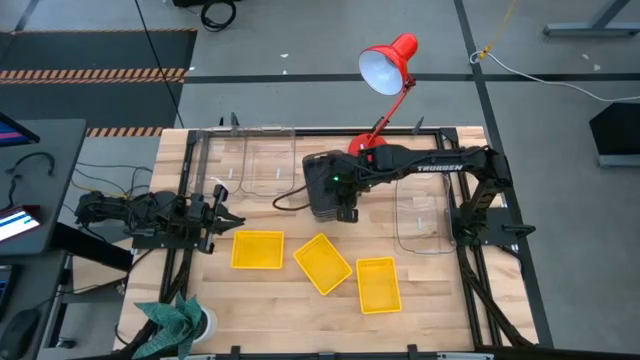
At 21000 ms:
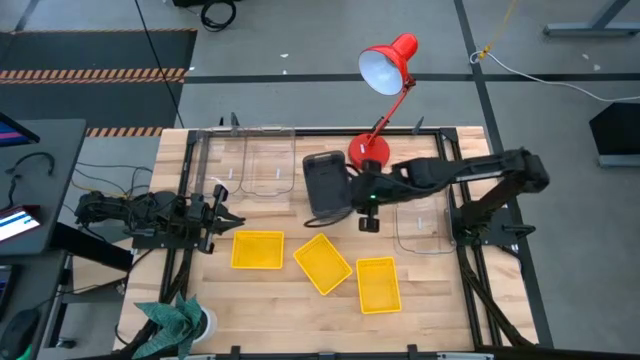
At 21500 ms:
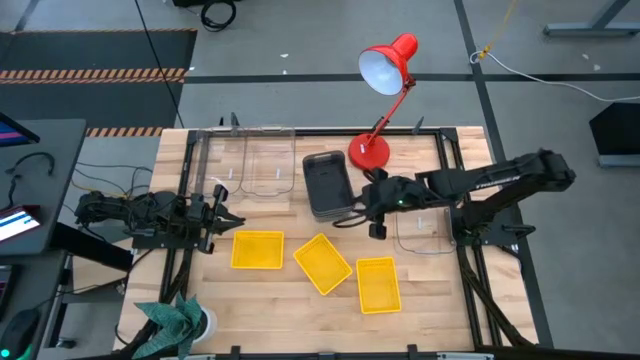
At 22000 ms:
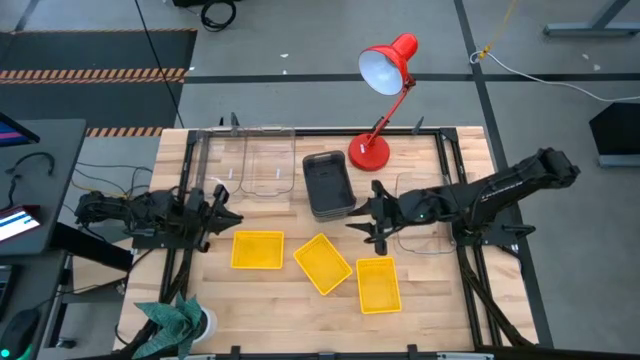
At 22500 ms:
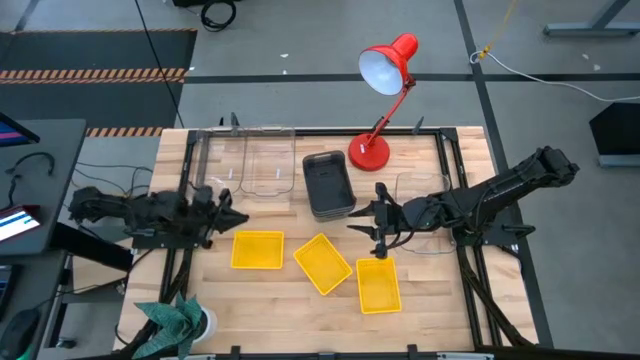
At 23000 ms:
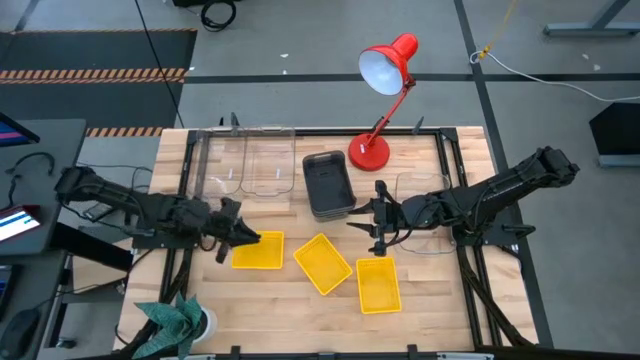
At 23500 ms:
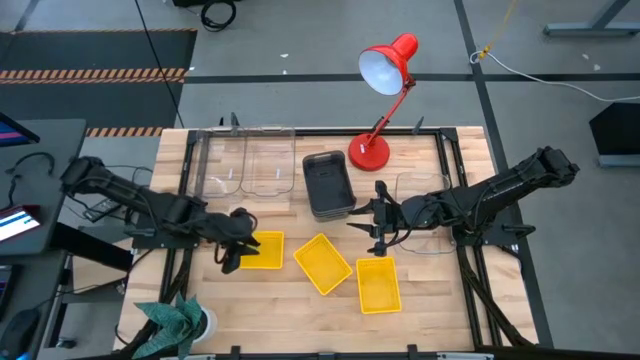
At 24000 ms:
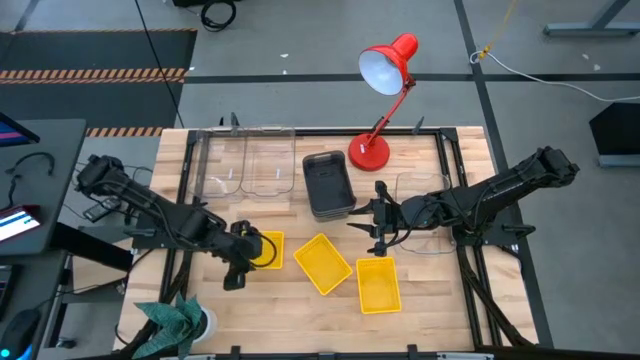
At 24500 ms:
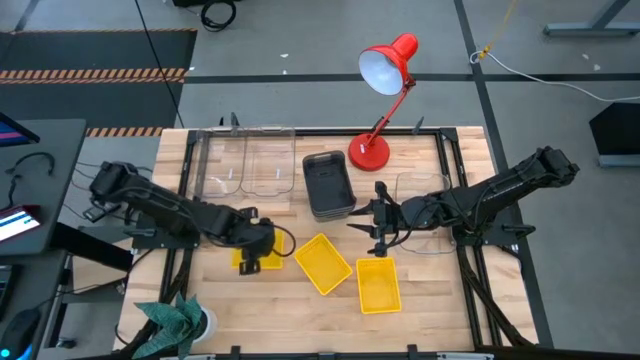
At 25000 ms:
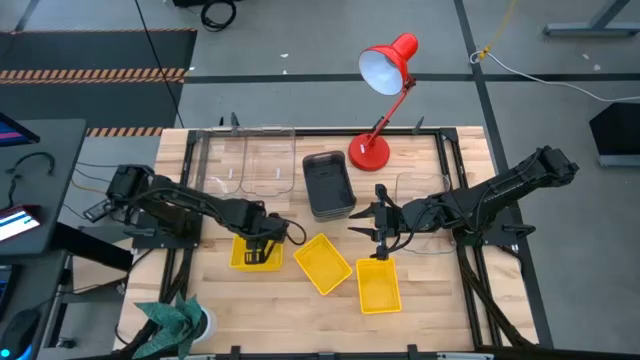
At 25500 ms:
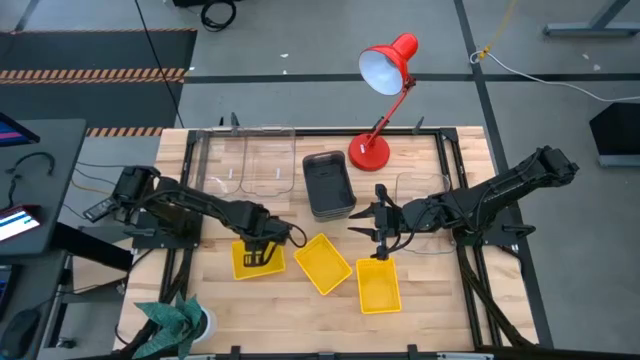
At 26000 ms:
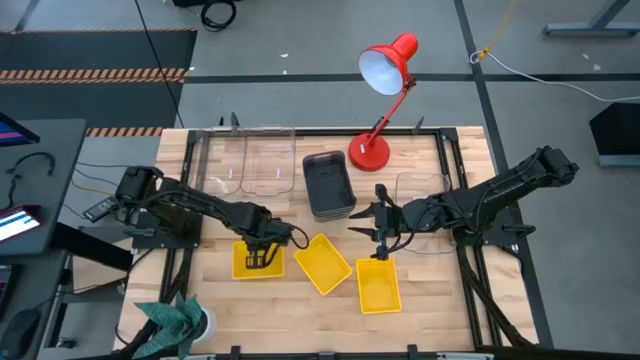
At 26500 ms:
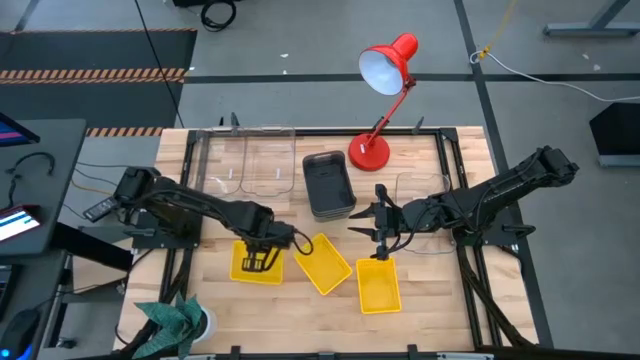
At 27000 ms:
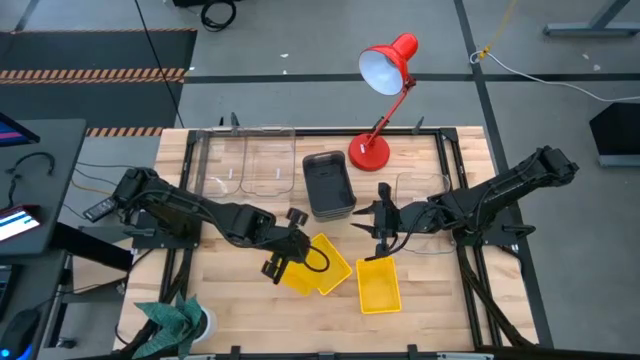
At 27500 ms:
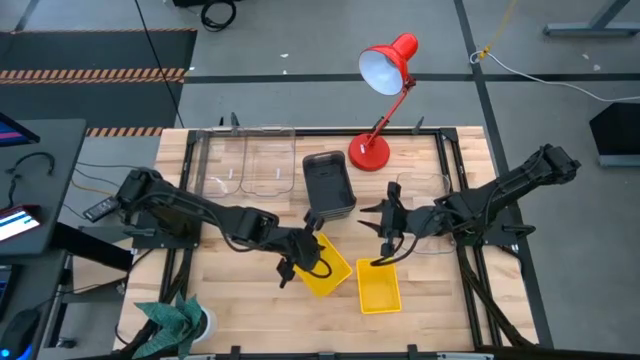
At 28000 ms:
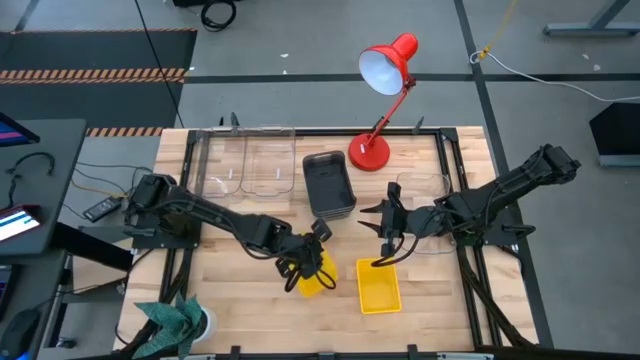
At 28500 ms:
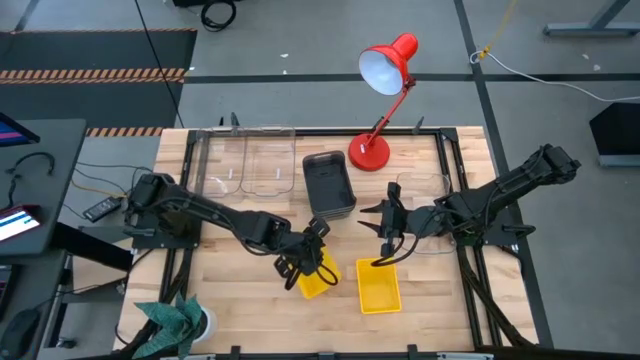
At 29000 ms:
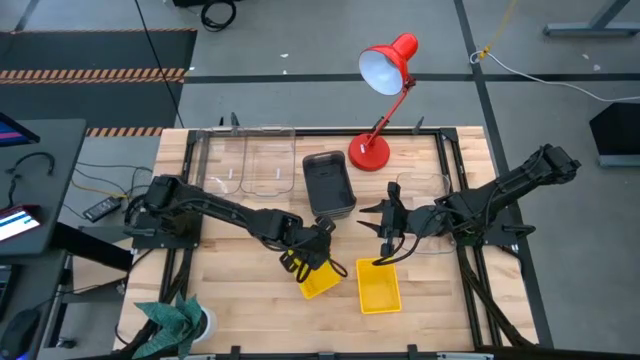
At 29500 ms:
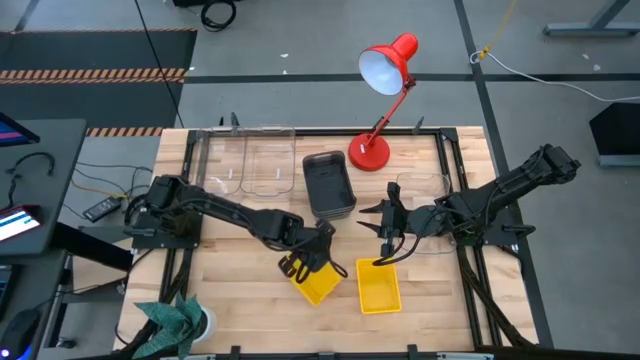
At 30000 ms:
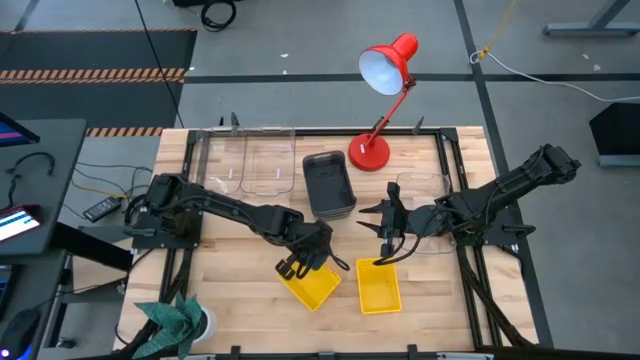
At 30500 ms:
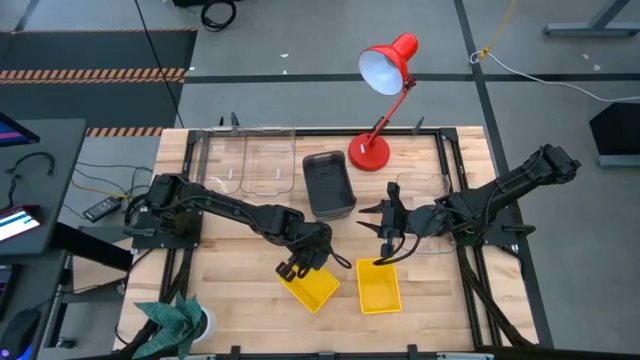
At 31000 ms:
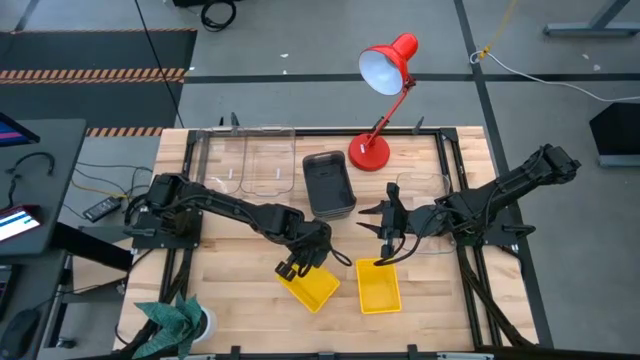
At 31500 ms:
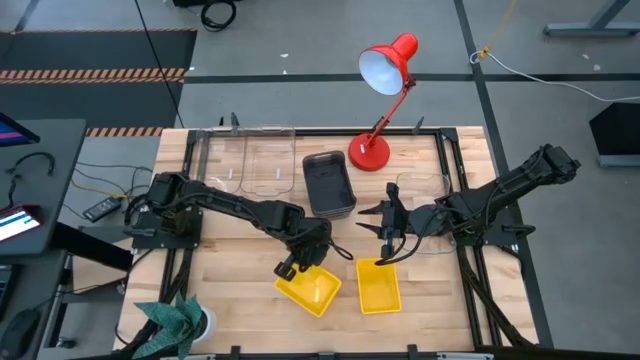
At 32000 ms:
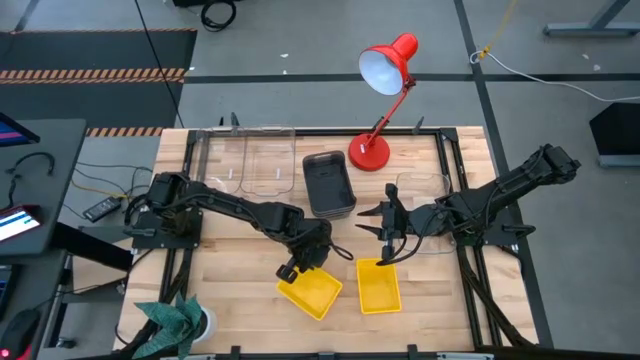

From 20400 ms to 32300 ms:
Stack the left yellow bin on the middle yellow bin

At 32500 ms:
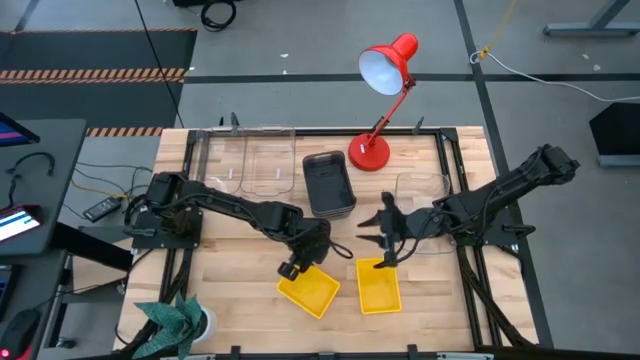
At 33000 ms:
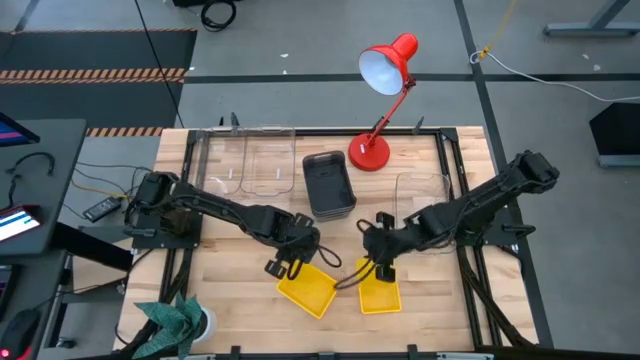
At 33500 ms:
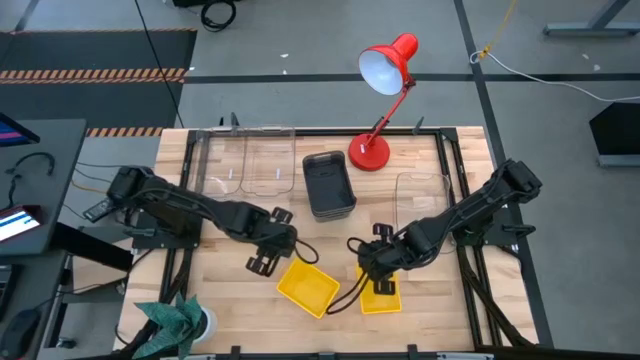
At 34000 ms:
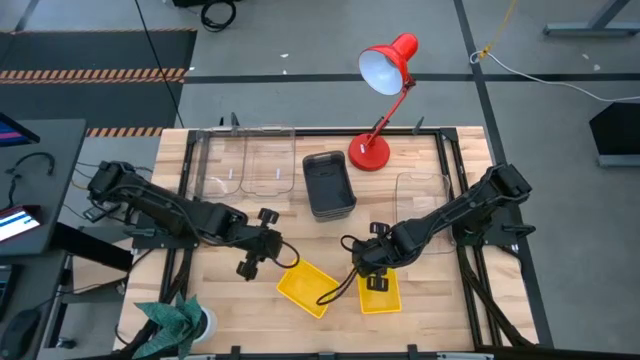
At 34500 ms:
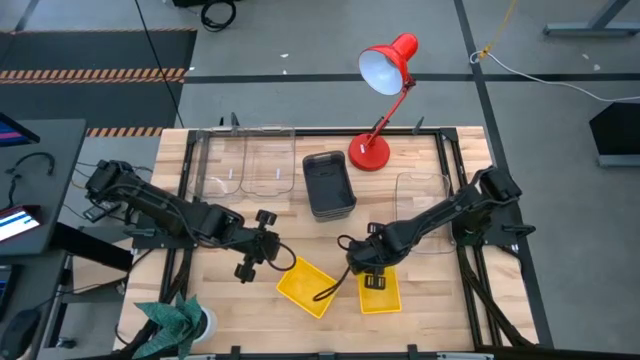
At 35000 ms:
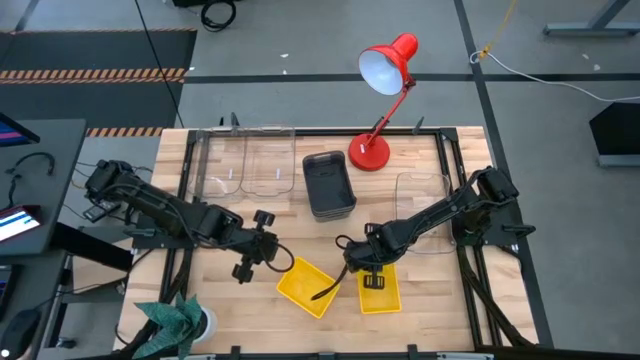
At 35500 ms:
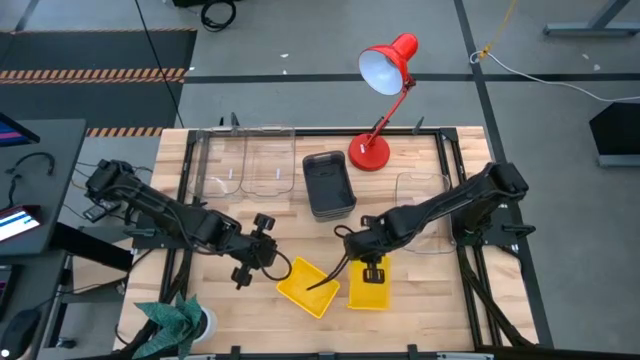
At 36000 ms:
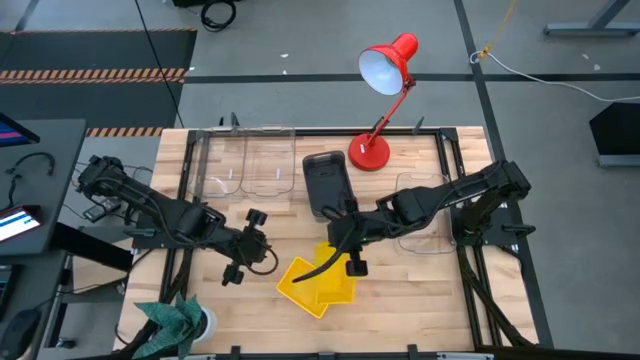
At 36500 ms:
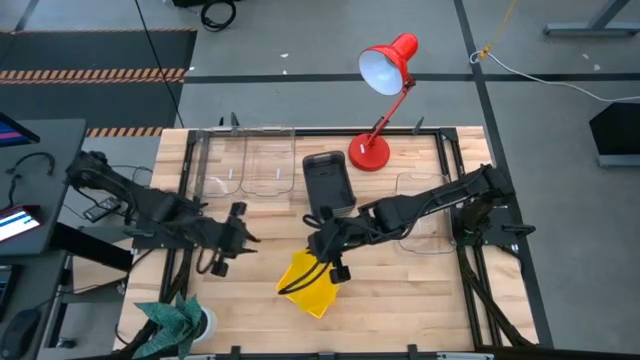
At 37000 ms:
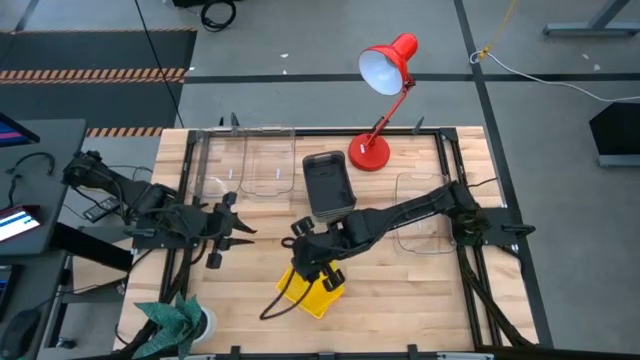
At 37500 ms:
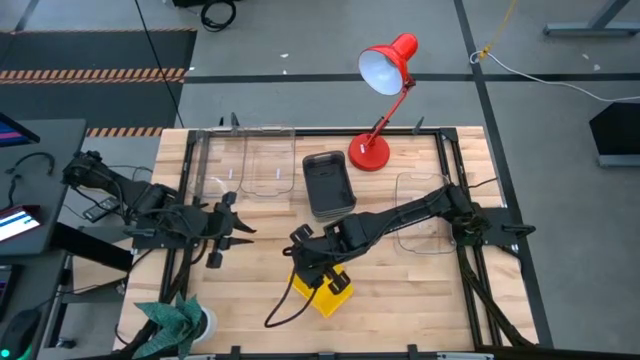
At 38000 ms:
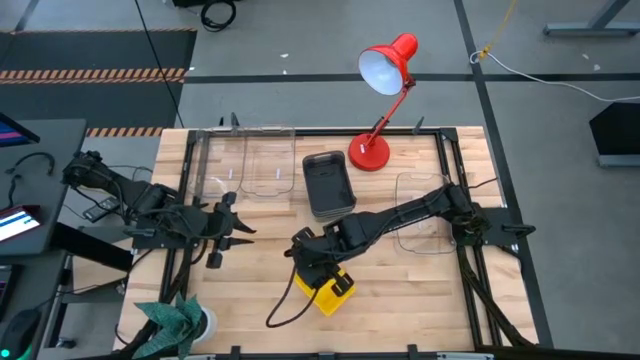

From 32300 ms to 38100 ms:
Stack the right yellow bin on the stacked yellow bins
